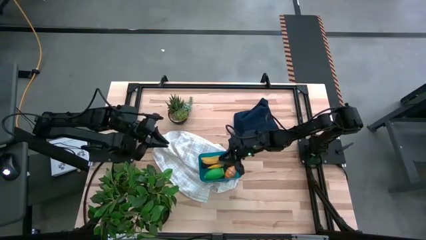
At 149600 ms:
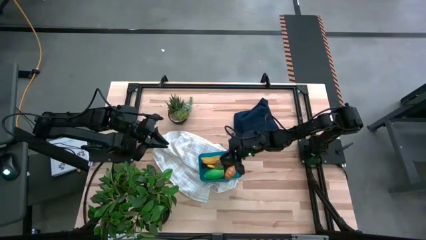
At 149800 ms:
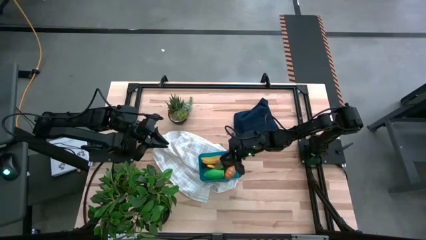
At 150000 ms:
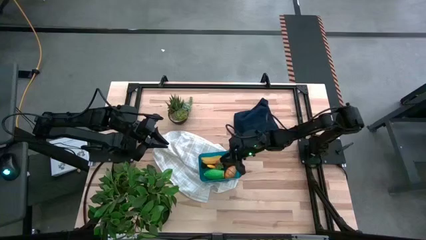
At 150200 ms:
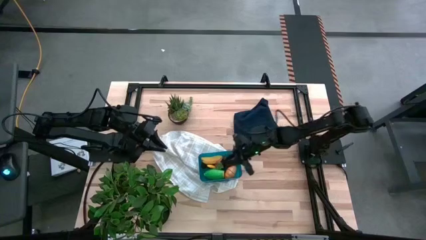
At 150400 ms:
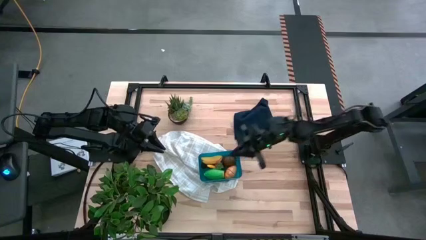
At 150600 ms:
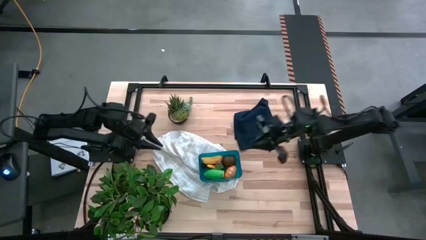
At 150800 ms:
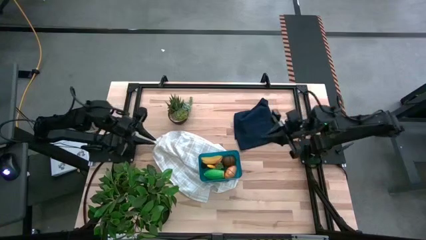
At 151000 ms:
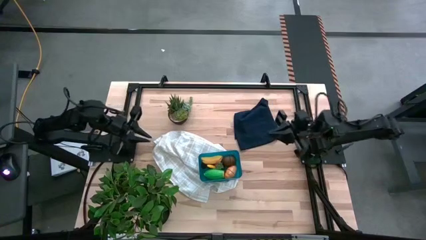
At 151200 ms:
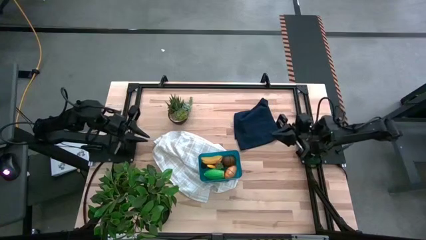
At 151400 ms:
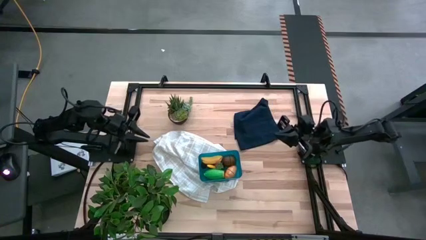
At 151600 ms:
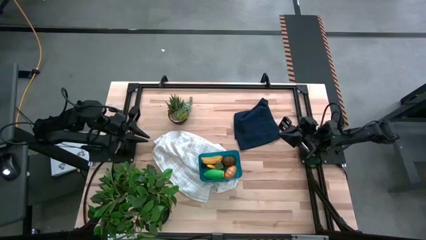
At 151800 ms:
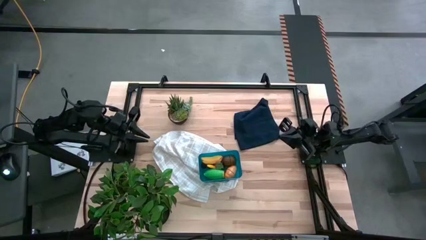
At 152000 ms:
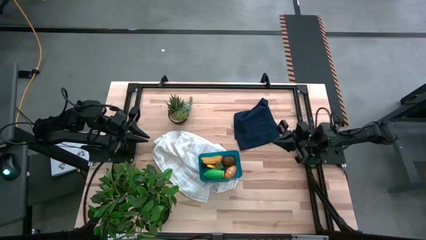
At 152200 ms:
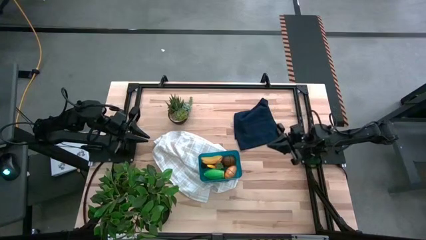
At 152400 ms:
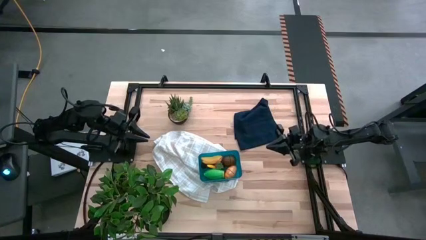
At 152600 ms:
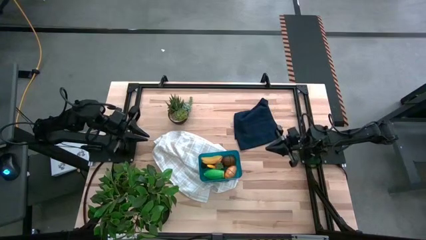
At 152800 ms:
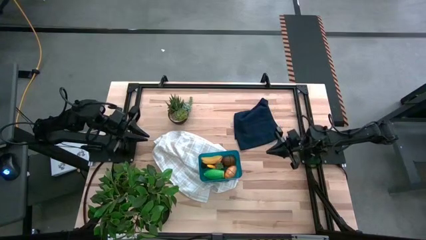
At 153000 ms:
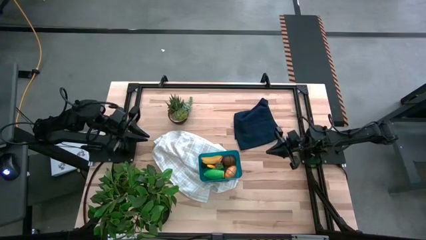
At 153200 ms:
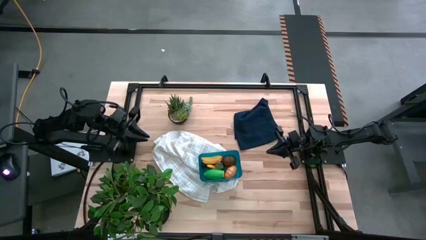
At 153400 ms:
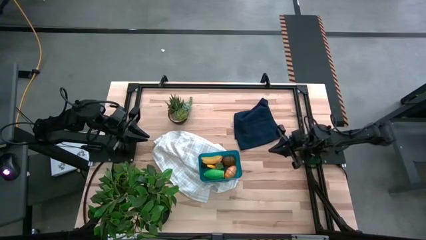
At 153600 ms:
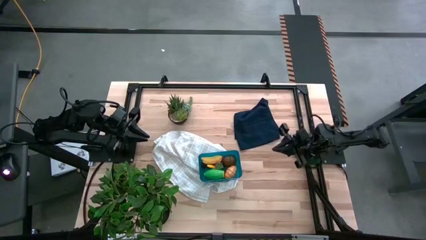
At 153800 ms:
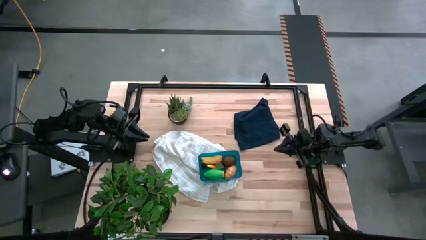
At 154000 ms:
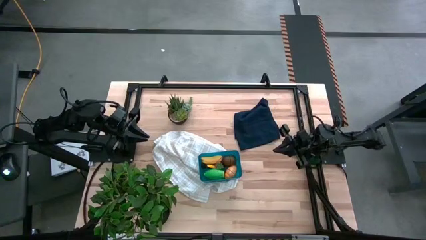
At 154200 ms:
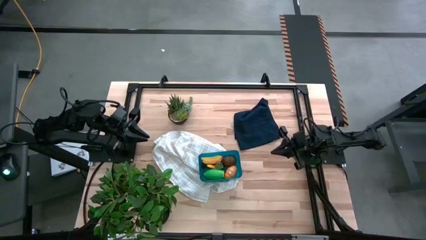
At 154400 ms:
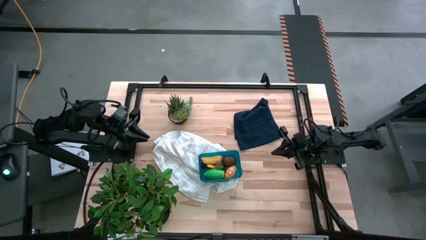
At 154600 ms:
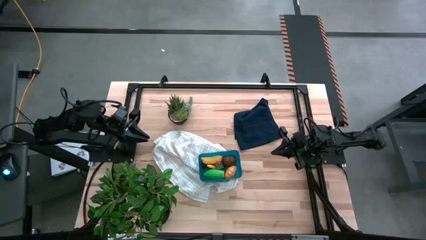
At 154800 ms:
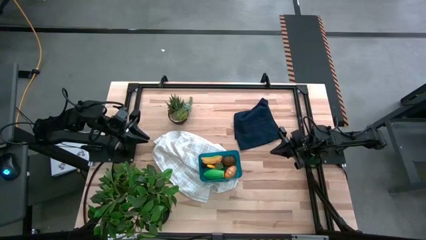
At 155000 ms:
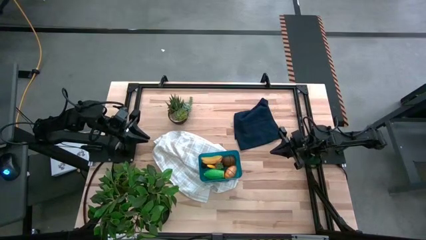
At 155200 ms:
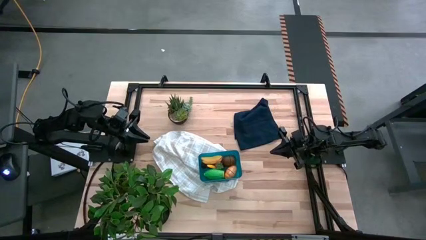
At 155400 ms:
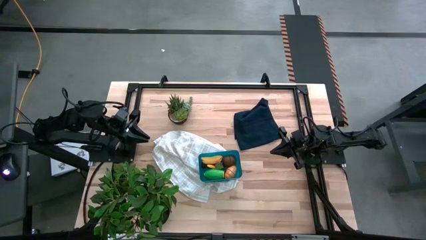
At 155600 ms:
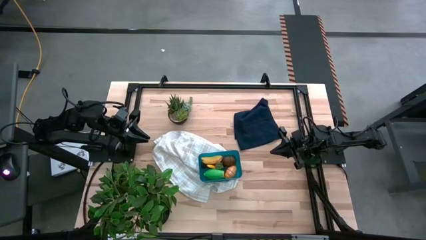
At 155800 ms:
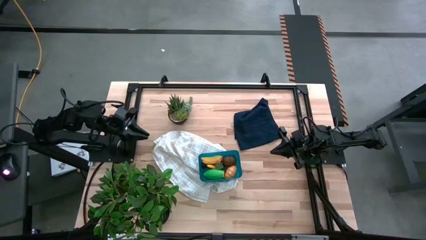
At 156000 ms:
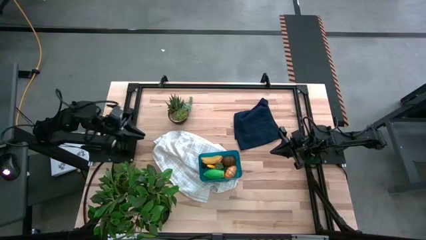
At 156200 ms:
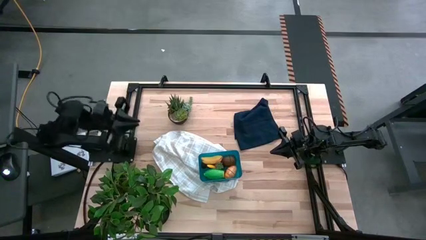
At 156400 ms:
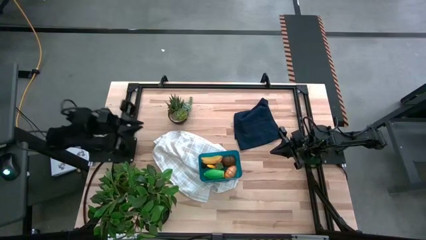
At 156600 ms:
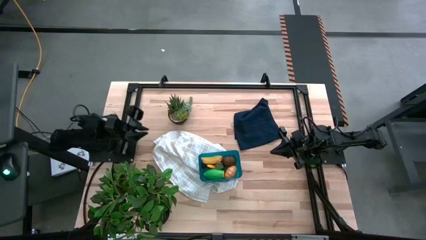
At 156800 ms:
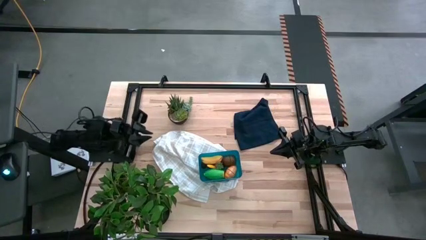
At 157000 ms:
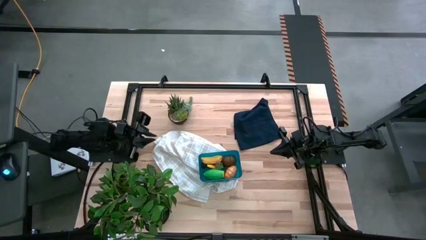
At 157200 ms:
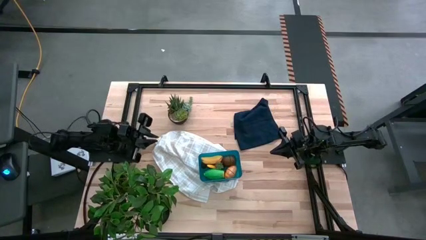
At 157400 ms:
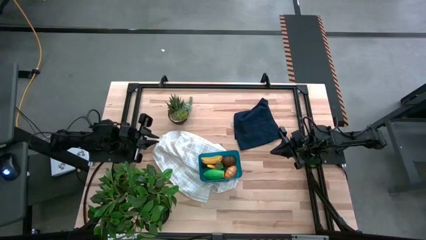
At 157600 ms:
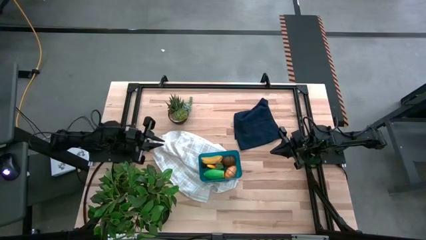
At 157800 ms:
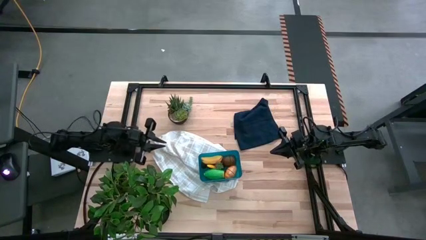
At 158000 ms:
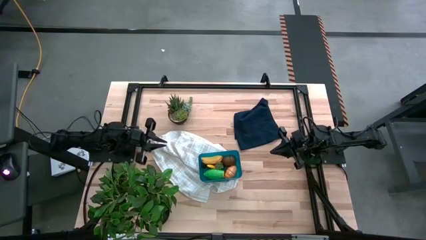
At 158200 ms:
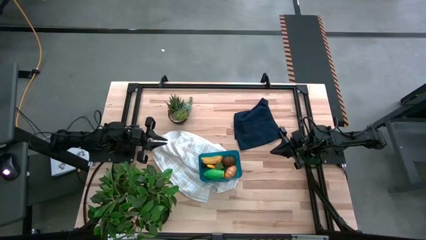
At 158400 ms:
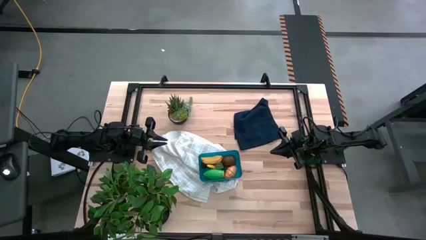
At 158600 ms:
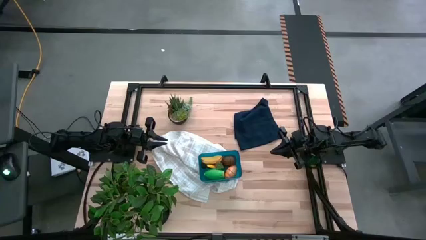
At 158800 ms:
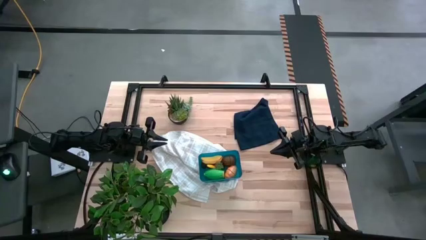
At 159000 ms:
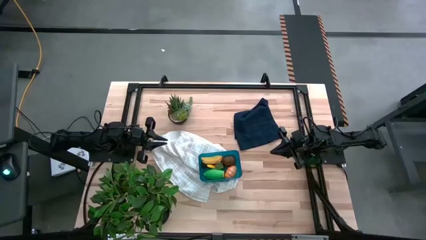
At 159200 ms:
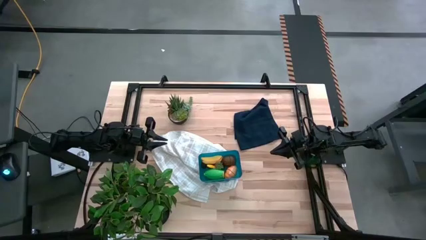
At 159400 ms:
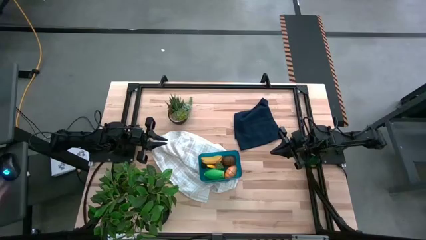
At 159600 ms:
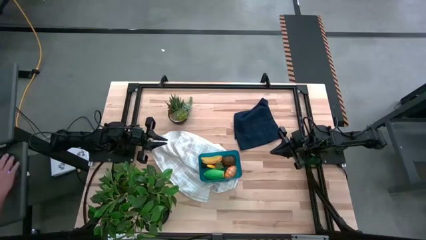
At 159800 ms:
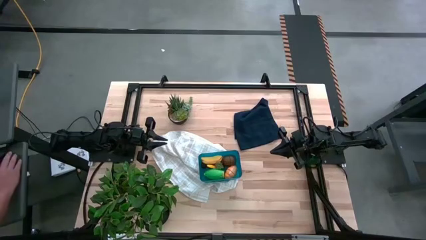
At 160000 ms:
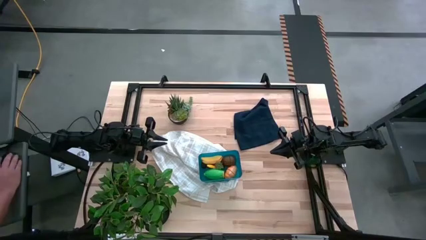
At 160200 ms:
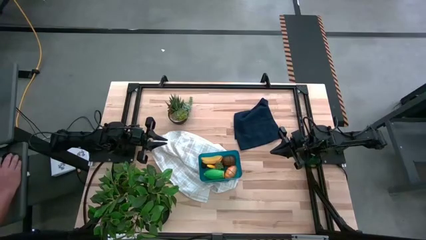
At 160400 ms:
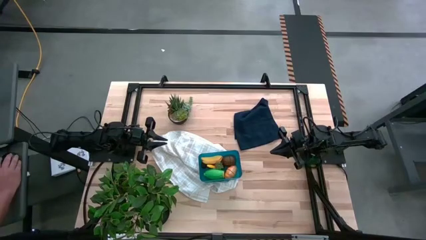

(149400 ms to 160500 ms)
Task: Pick and placing Produce into tupperware
Return to Home Position

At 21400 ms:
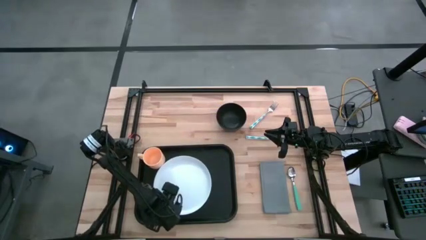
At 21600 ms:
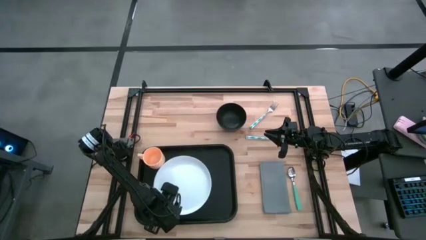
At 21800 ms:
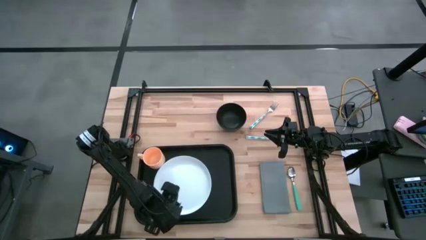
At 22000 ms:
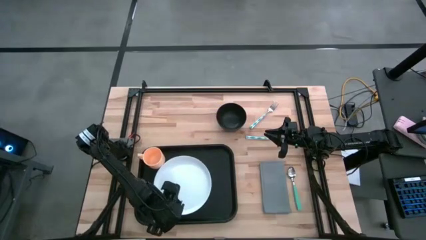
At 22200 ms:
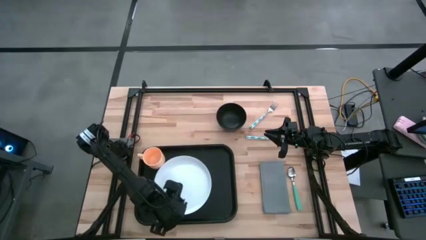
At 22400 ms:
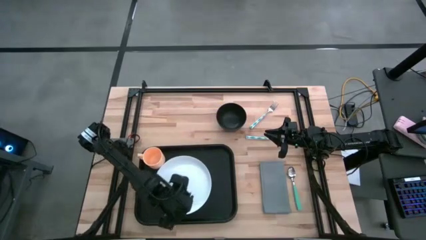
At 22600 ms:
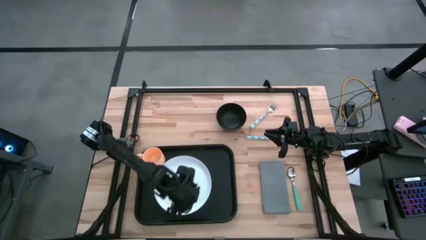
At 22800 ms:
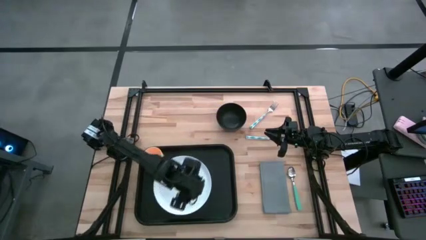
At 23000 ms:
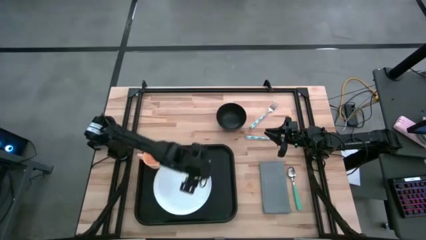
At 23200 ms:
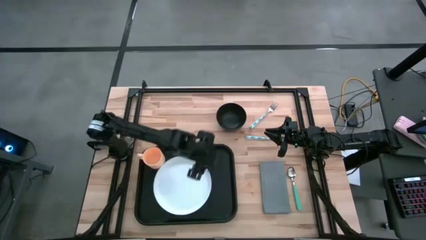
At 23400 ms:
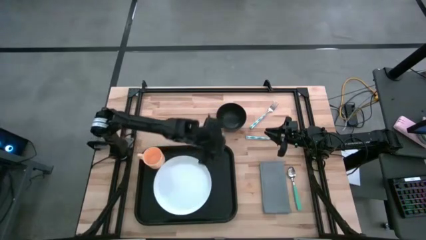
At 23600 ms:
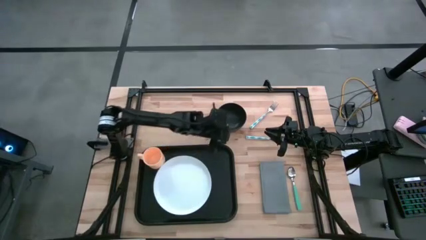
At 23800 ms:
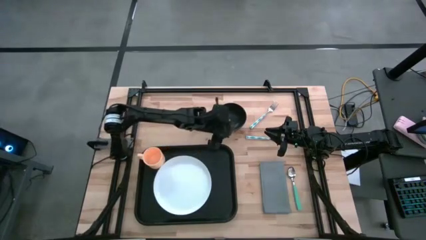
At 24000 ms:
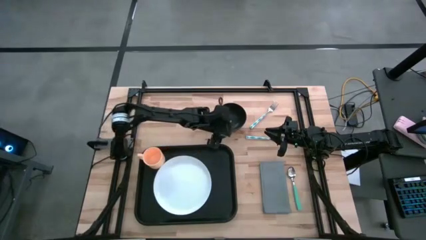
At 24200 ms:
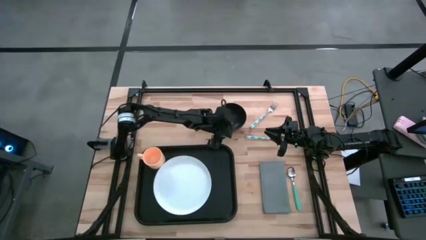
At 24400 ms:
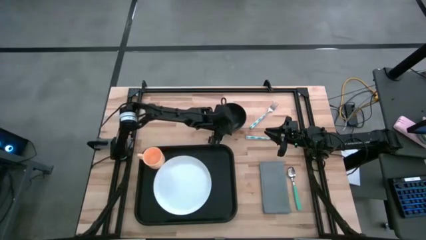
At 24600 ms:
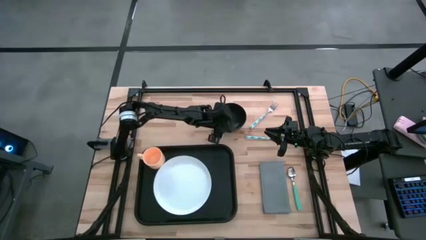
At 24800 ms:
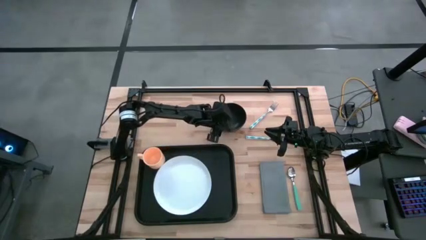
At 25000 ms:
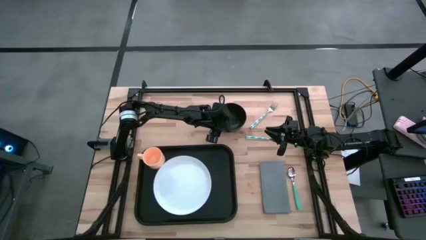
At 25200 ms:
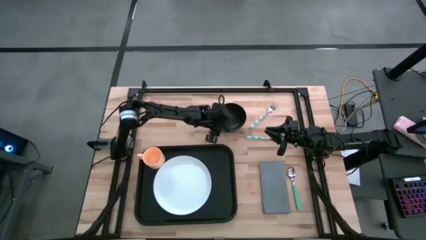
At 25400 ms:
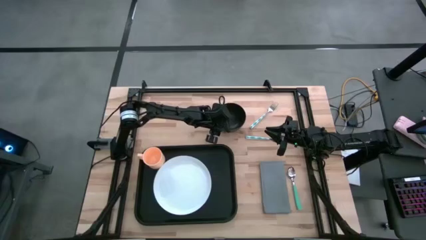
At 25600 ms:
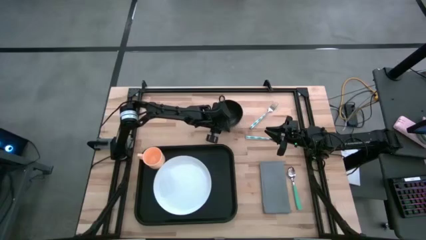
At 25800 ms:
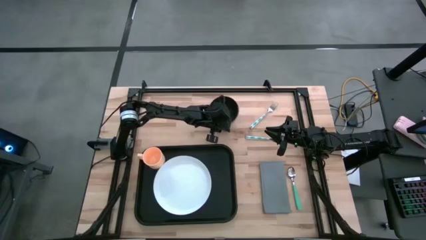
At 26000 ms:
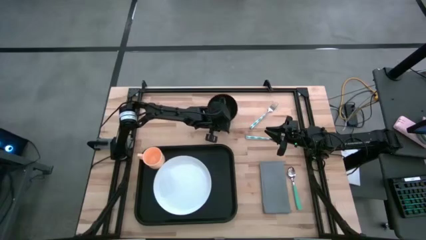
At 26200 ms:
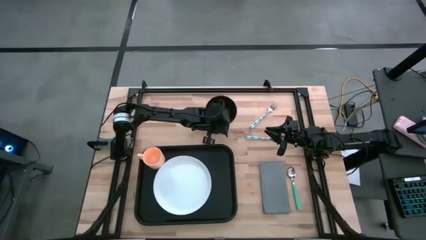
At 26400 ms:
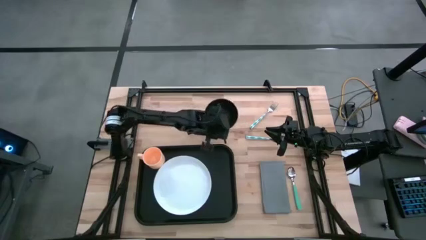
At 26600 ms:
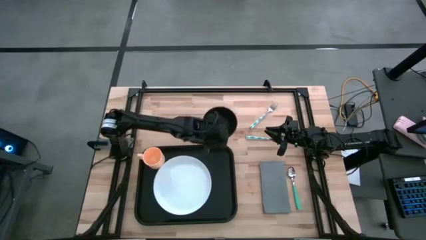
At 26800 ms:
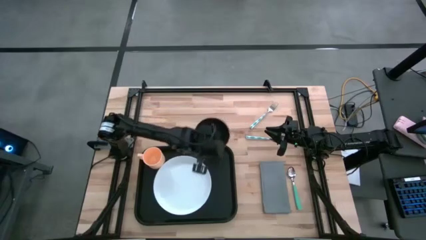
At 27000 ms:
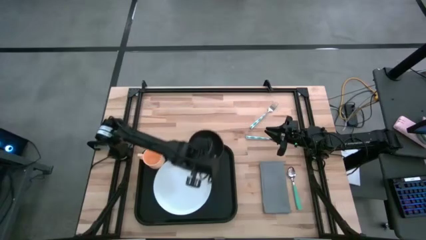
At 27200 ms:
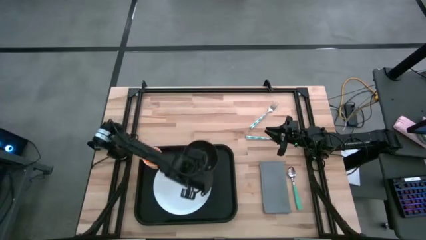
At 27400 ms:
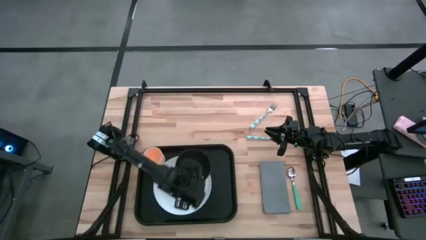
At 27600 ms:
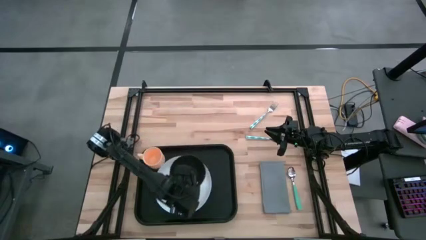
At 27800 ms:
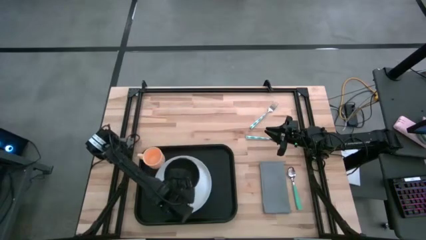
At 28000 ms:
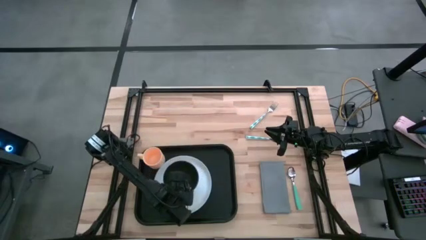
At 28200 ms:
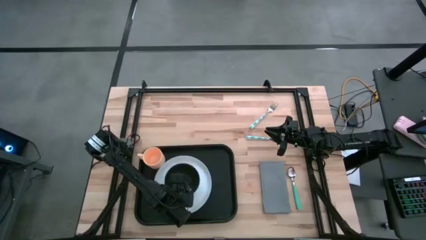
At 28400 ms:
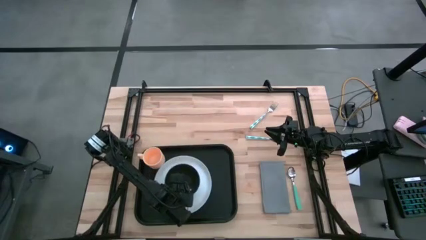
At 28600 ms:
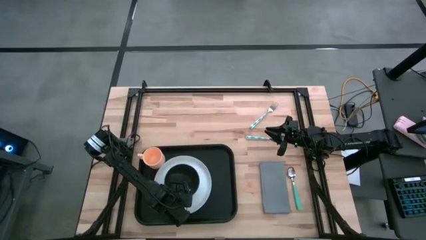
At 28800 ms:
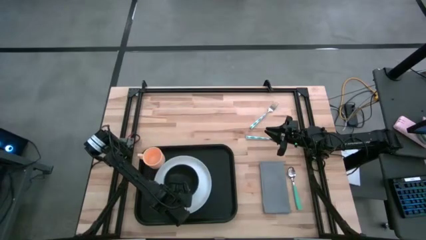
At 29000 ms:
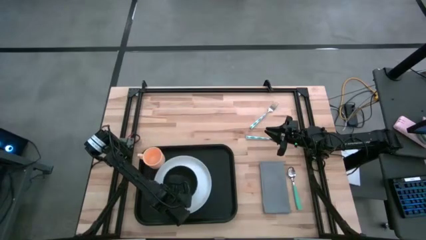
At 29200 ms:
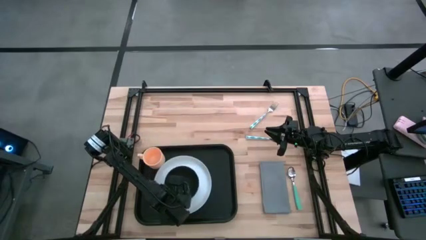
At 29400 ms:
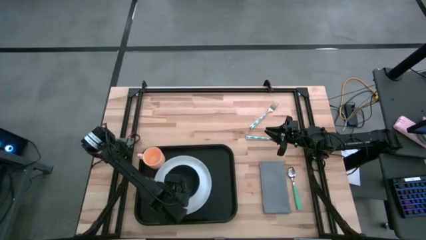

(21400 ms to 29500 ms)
Task: Set up tray
Put the black bowl on the white plate
